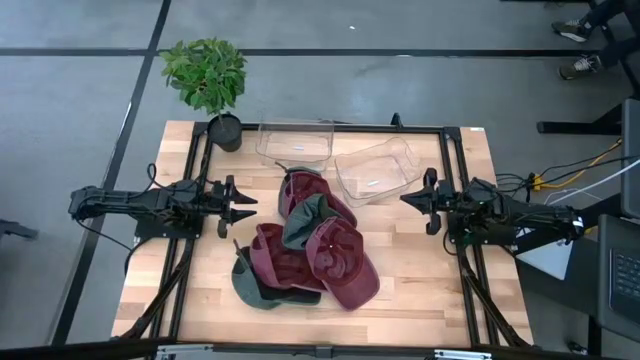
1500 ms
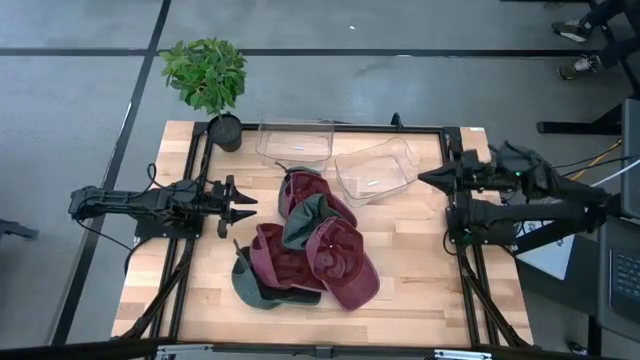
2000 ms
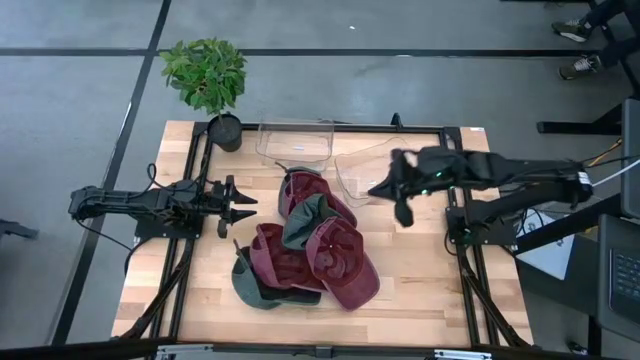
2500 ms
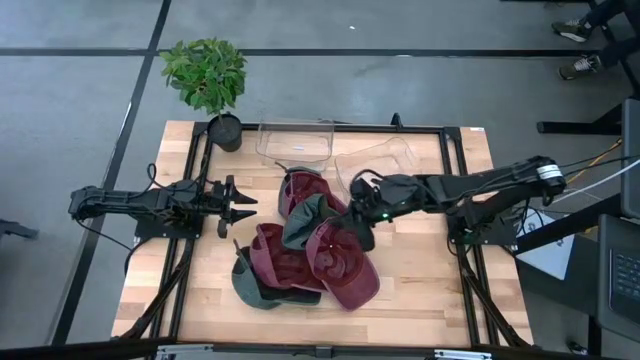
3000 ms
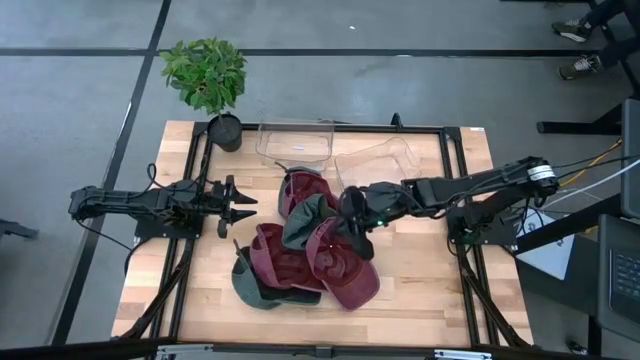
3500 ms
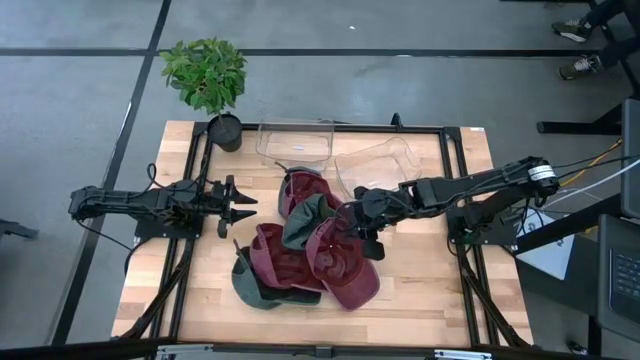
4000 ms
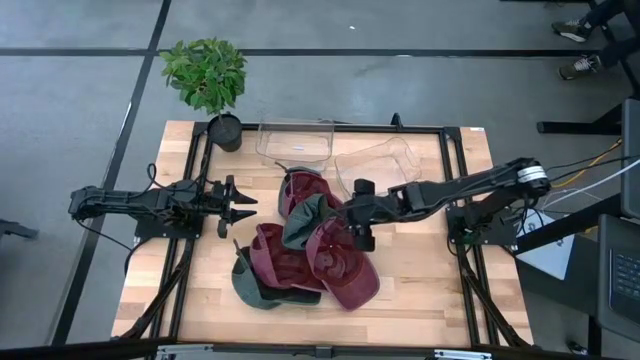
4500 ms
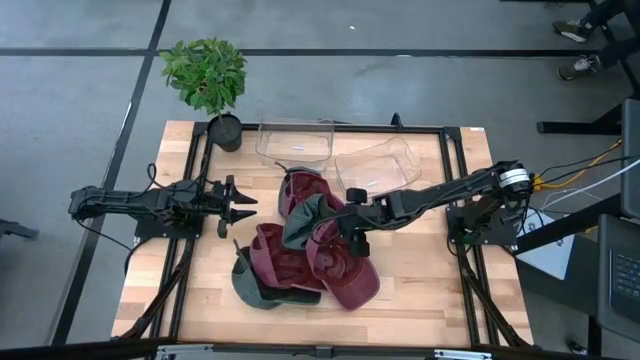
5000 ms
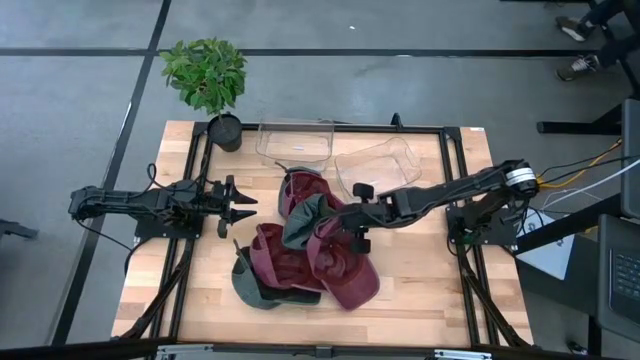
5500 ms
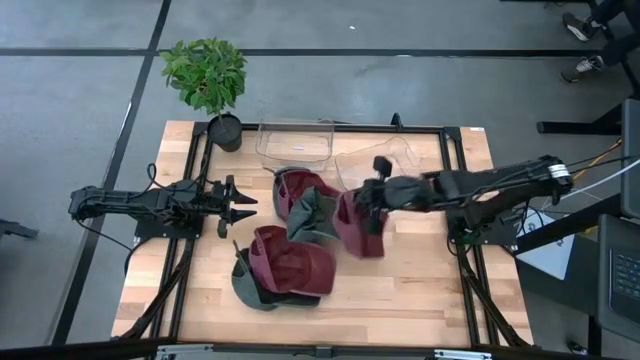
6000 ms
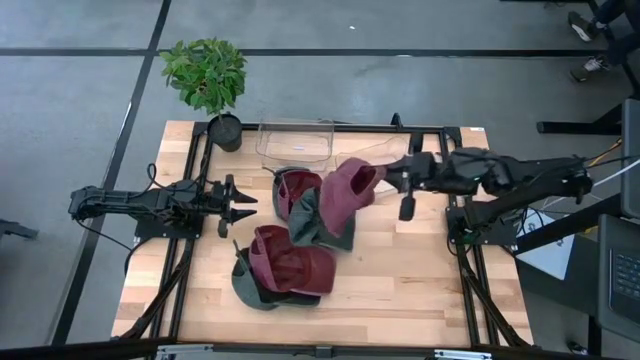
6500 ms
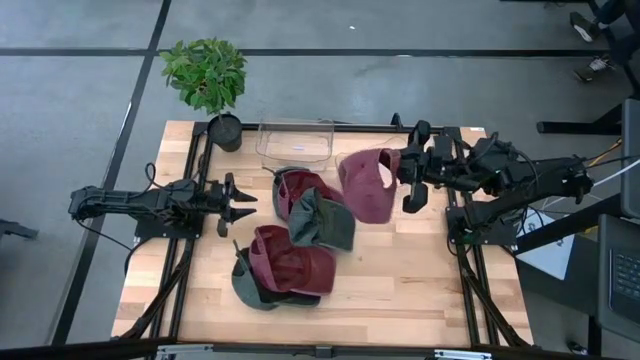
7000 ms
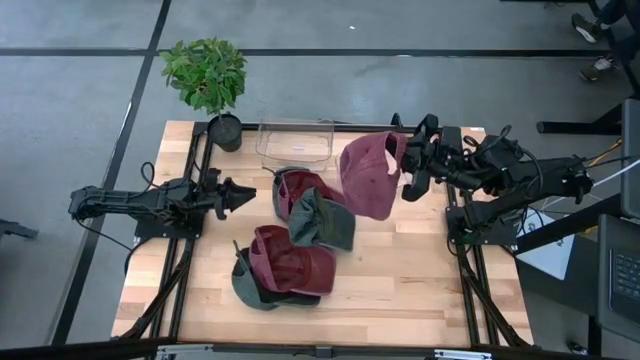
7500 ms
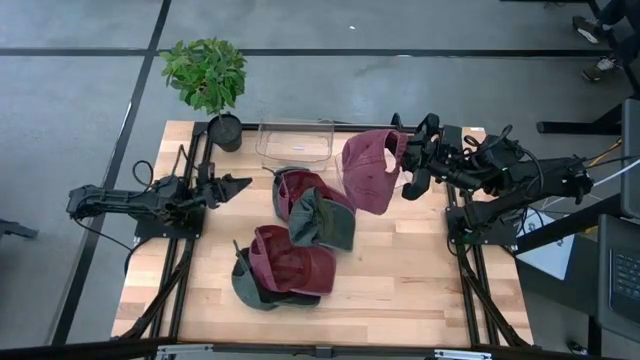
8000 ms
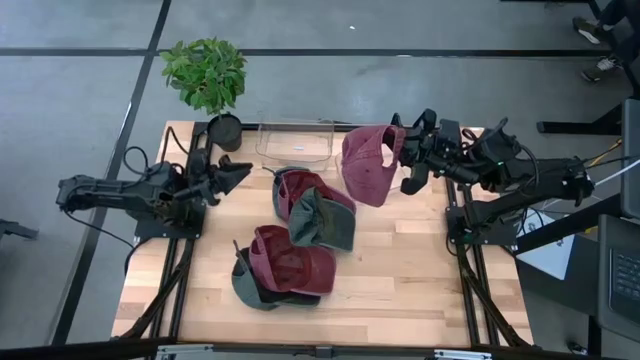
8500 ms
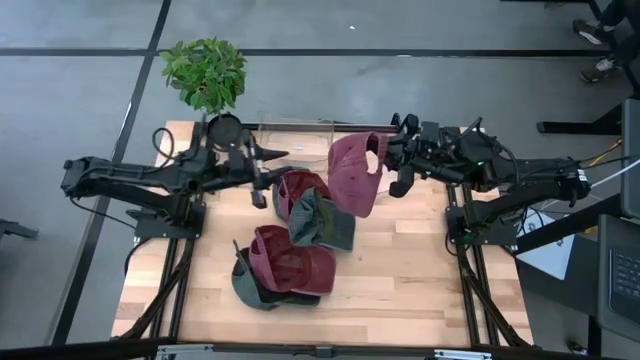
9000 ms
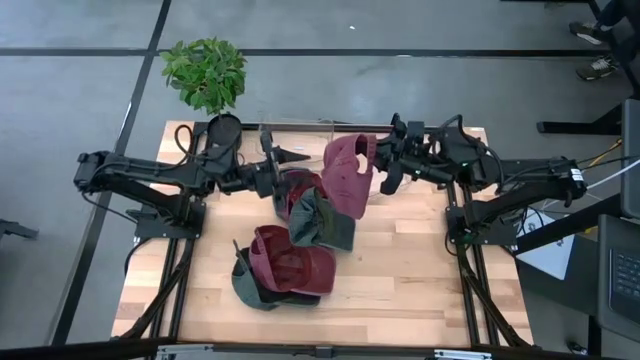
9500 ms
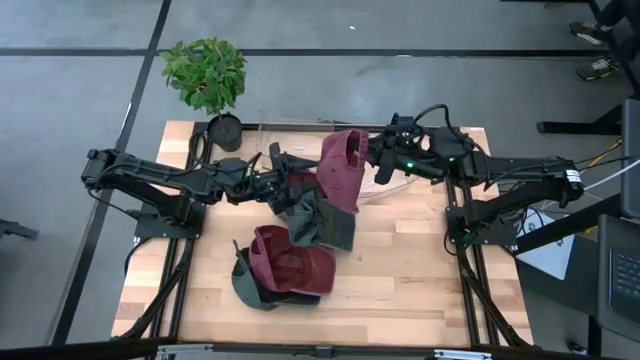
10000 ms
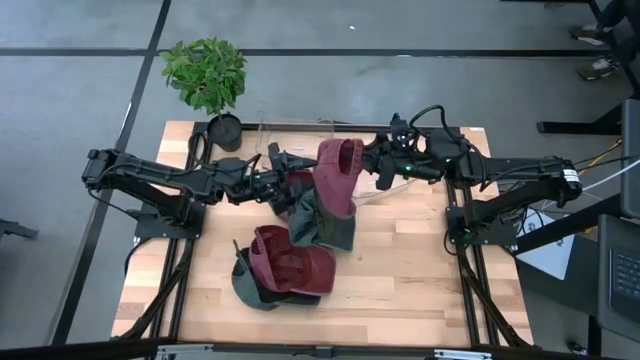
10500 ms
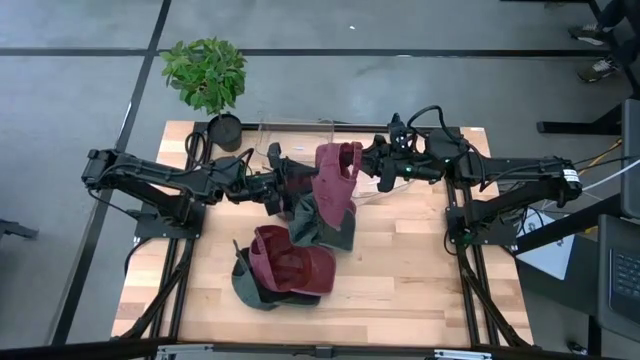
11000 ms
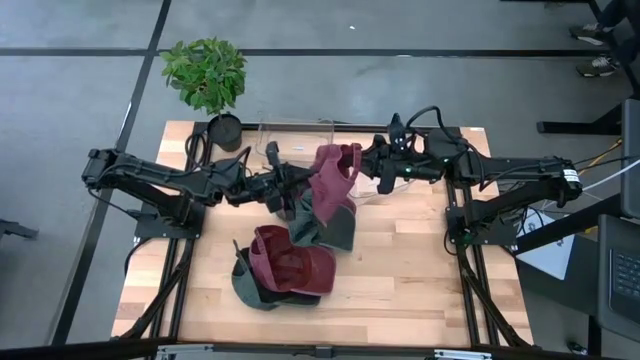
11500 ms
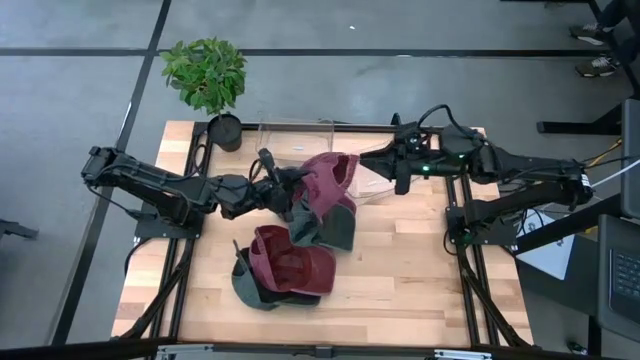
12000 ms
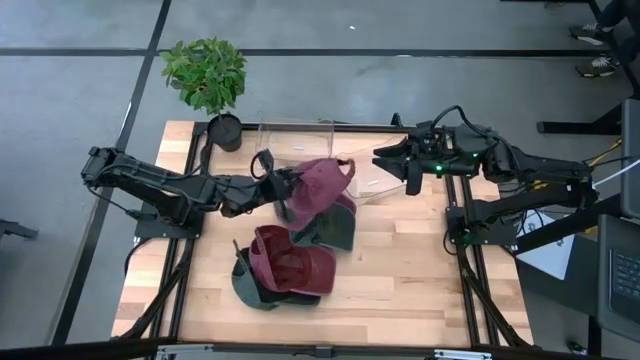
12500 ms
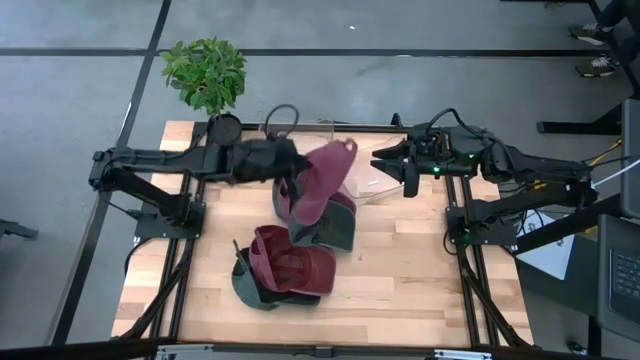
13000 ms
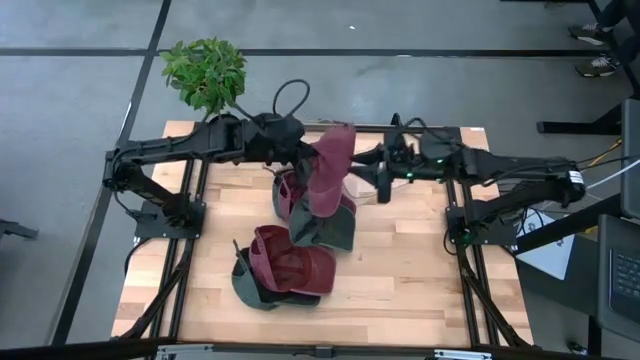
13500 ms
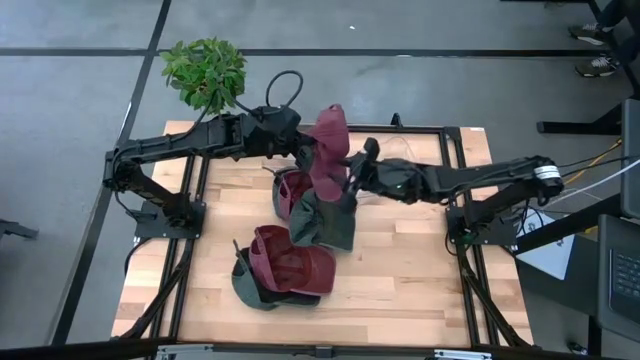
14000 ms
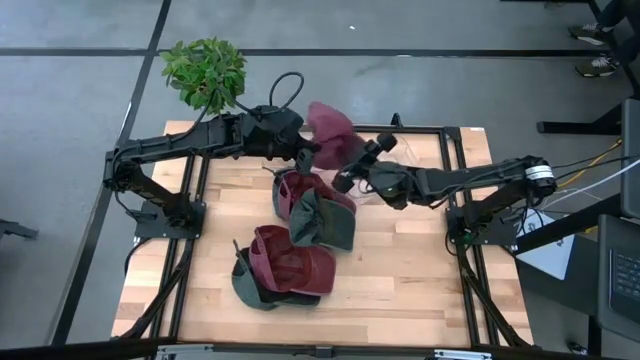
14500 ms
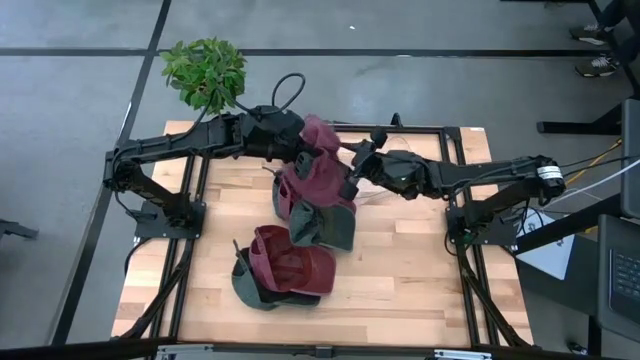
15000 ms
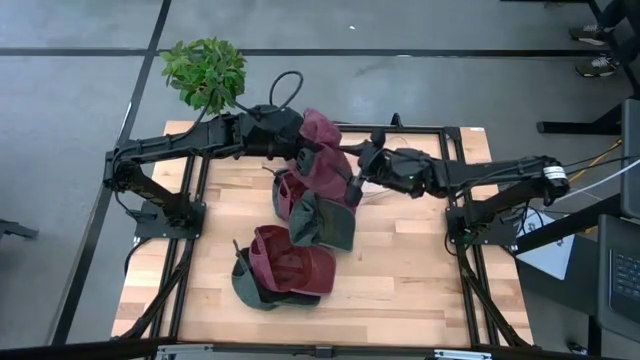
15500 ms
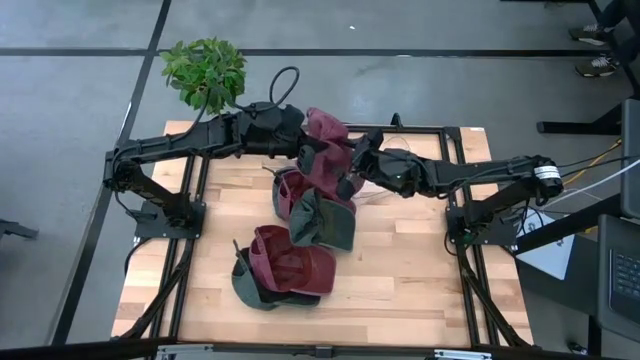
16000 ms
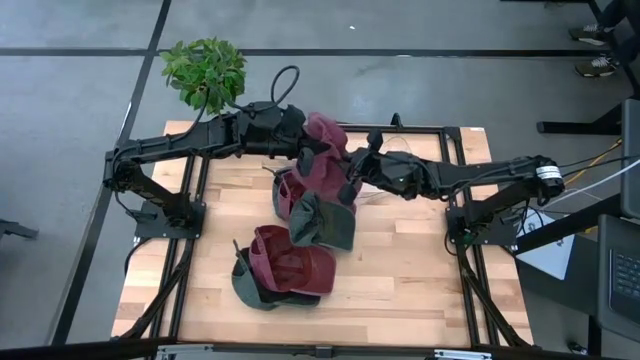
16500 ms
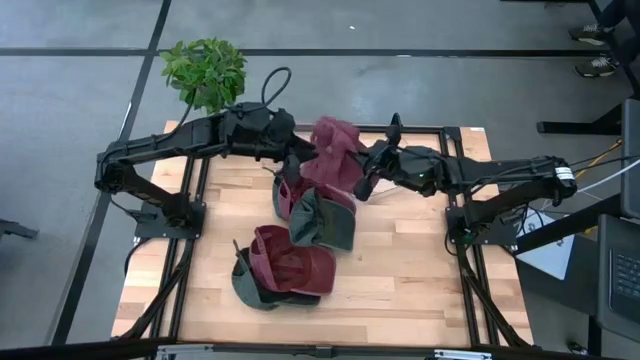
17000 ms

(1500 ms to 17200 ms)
Task: Pick & Place hat
Put the bottom right red cap into the right transparent bin

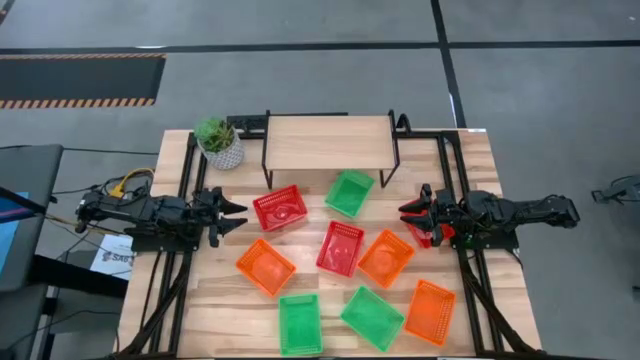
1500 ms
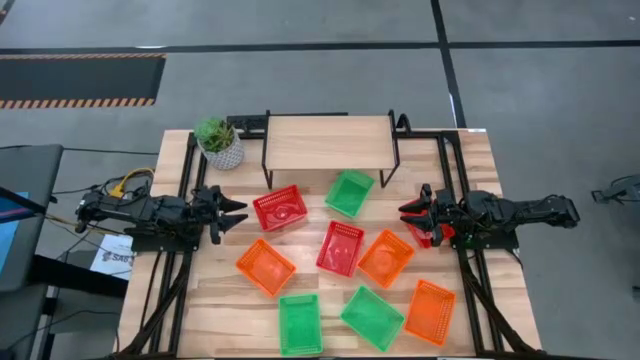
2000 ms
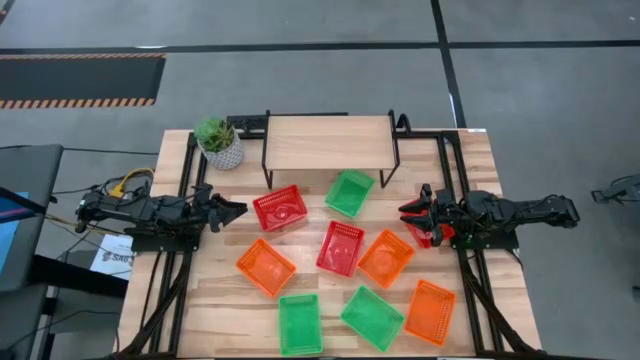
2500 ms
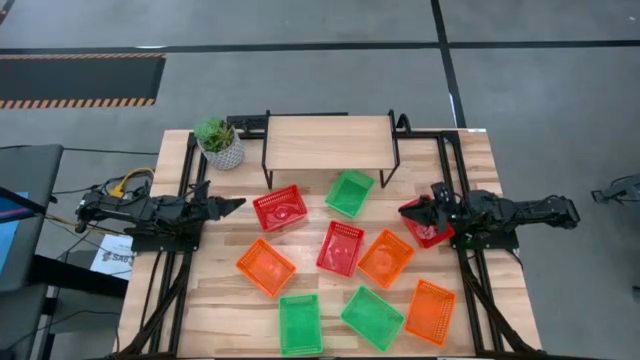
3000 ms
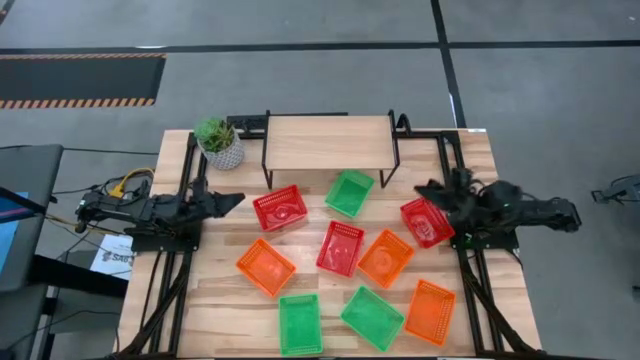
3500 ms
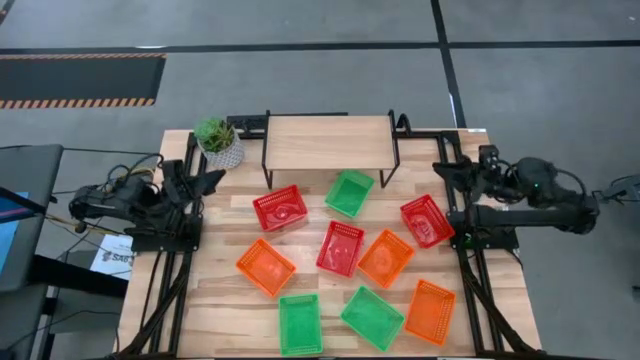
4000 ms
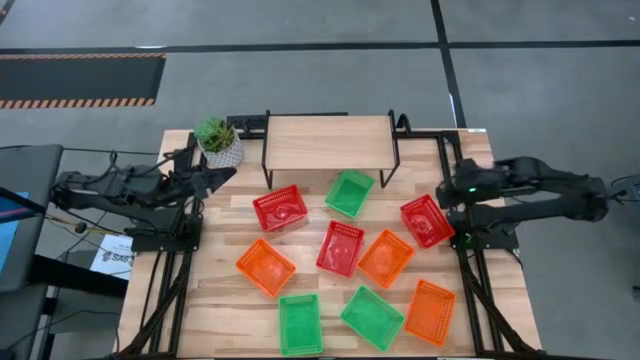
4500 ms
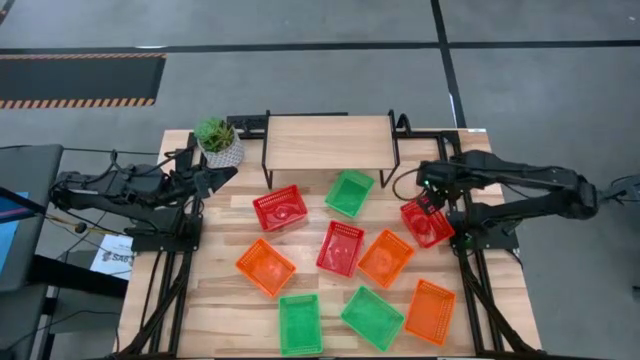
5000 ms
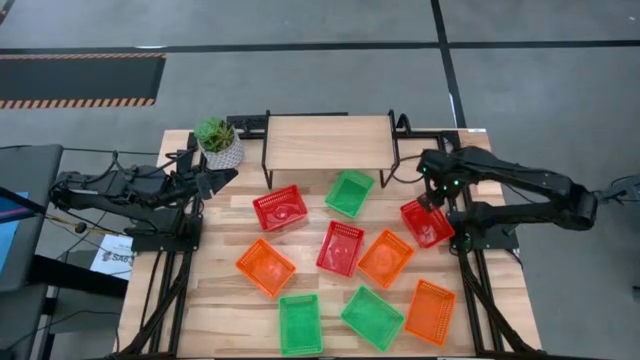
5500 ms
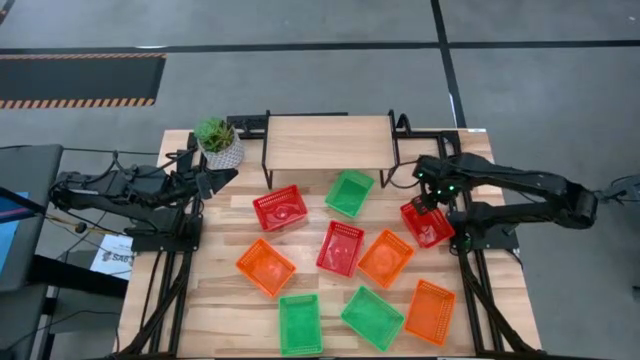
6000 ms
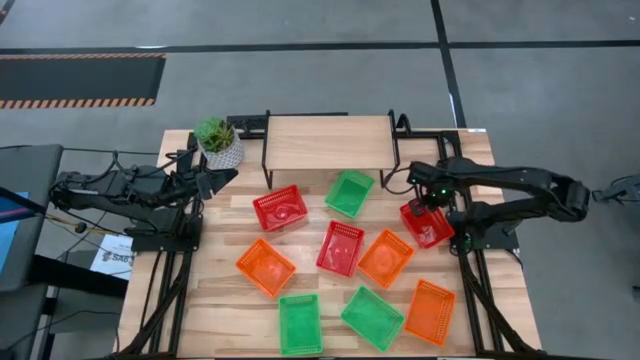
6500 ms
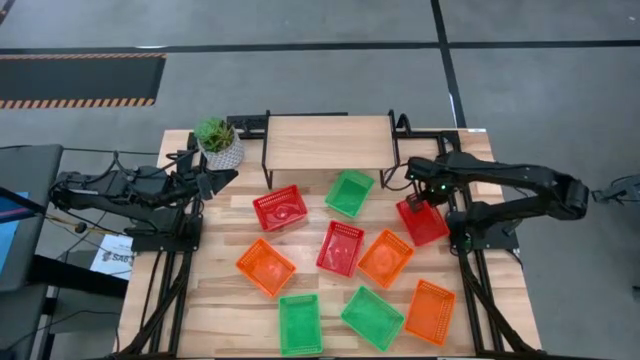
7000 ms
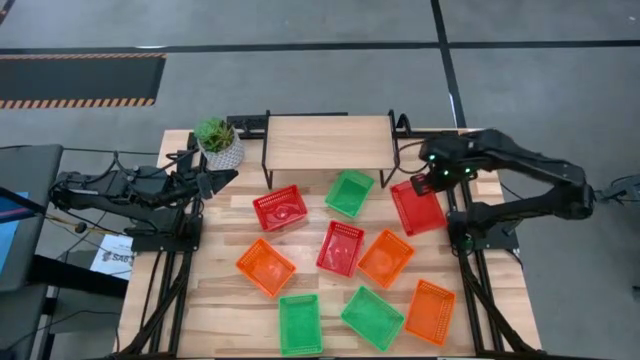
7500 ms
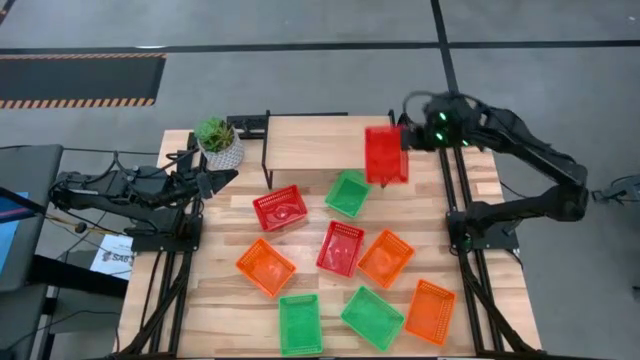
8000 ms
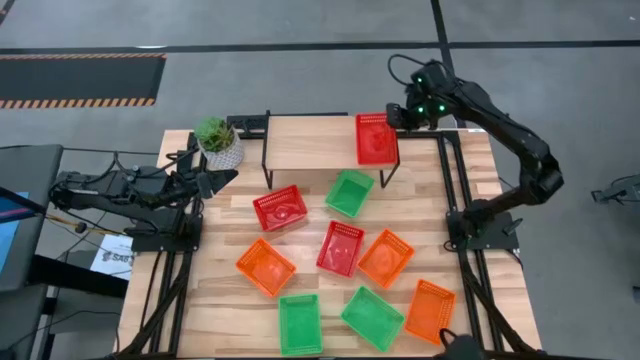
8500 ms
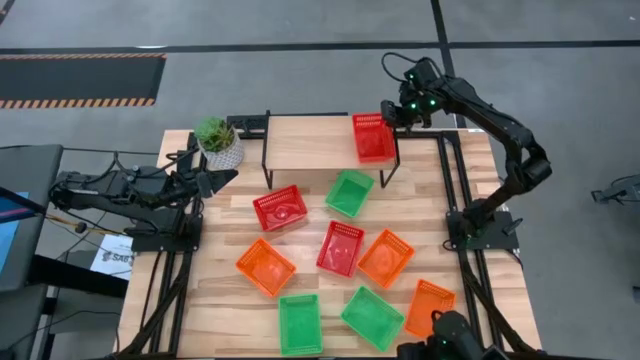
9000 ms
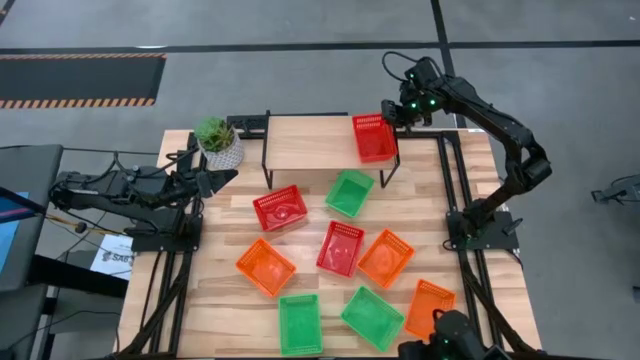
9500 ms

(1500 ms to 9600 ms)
Task: Stack baskets on shelf by color
Put the middle right red bin on the shelf
